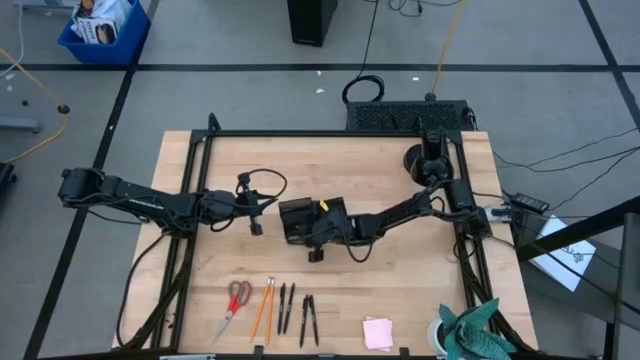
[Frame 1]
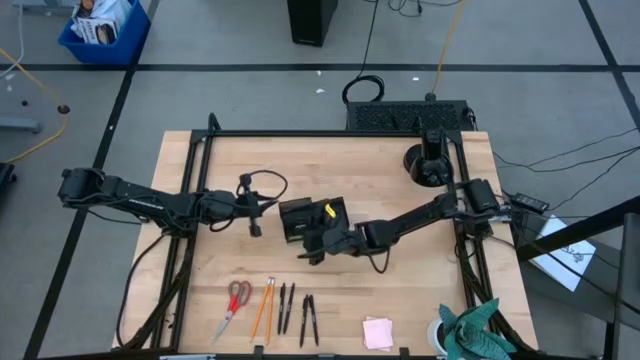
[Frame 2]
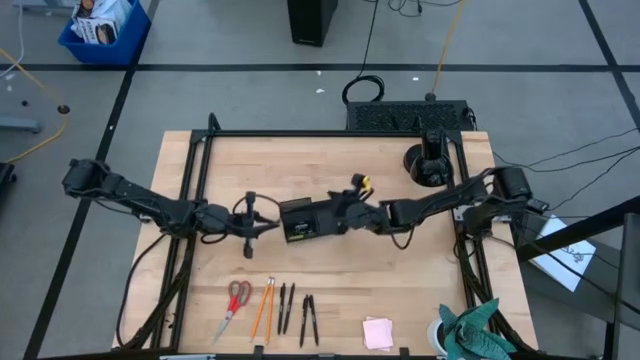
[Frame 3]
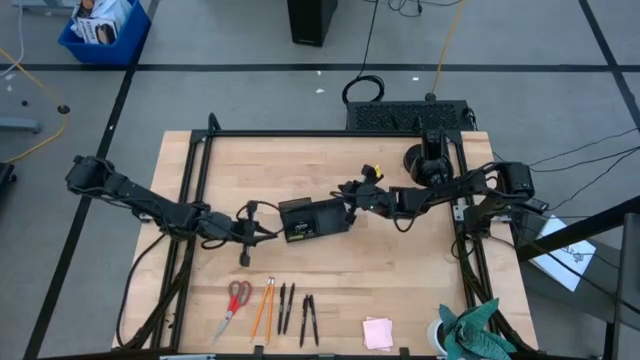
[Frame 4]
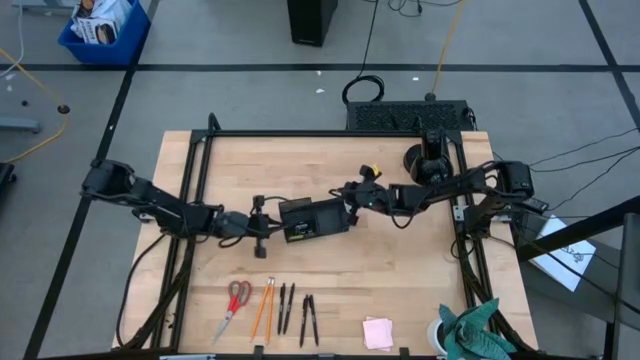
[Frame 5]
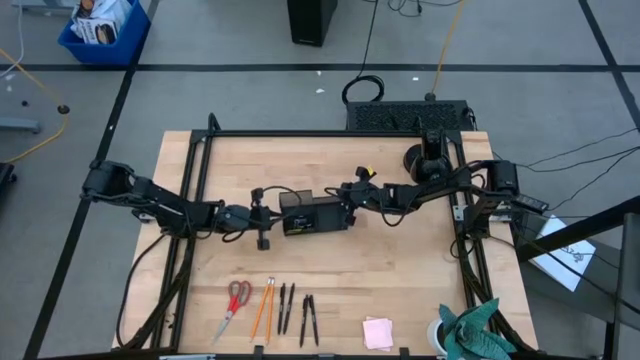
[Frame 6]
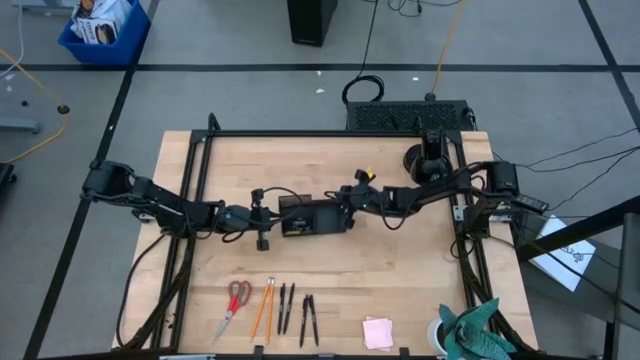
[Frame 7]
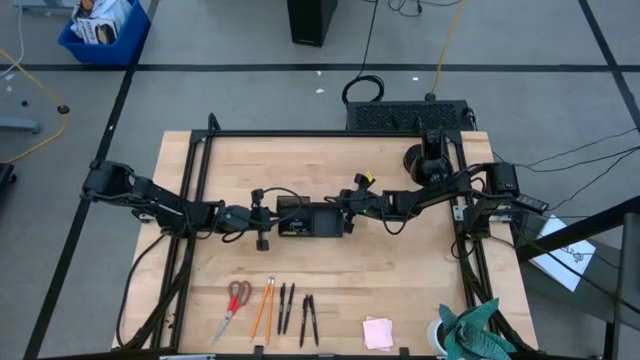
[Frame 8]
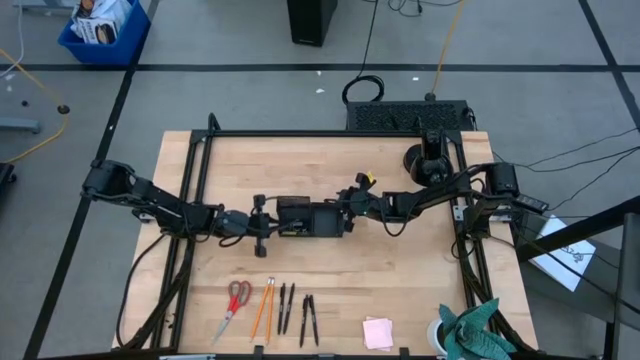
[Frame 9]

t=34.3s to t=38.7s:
Task: Pick and place office supplies into organizer
Adjust the black desk organizer on the table

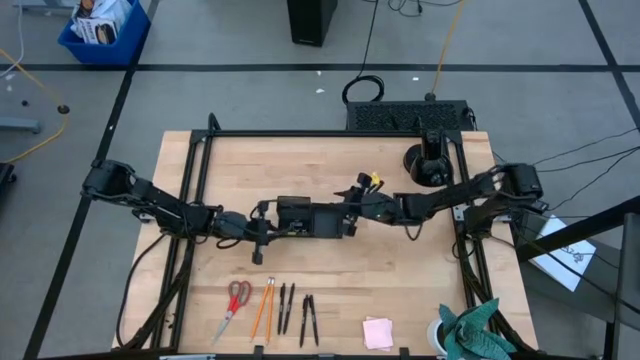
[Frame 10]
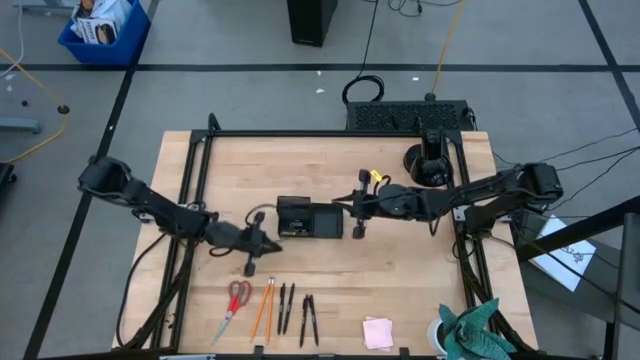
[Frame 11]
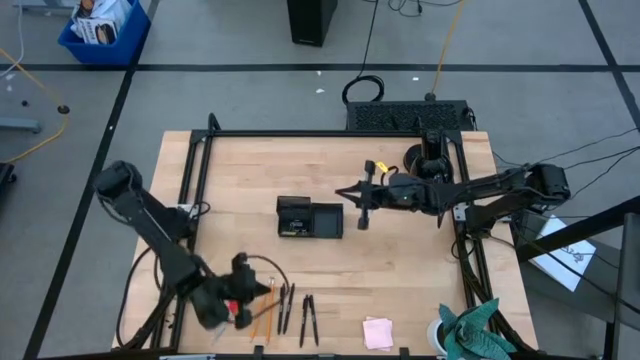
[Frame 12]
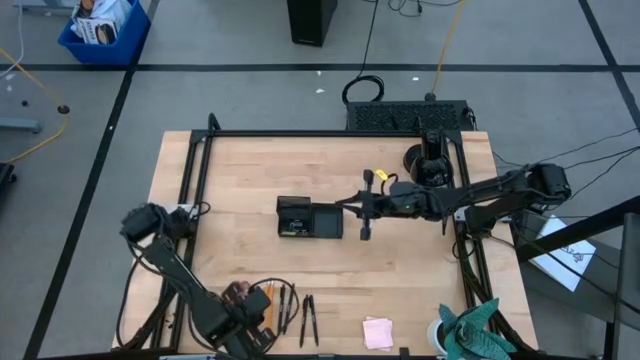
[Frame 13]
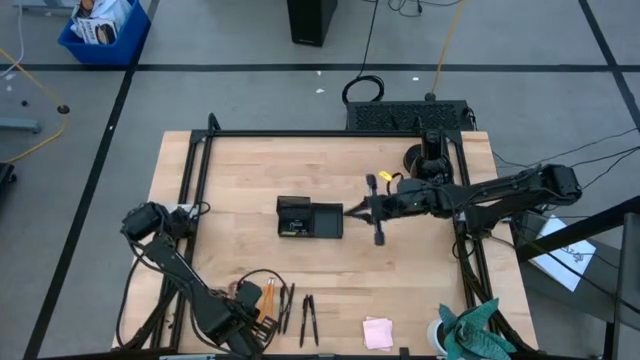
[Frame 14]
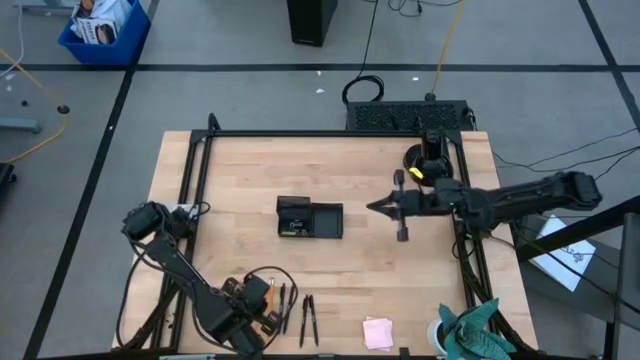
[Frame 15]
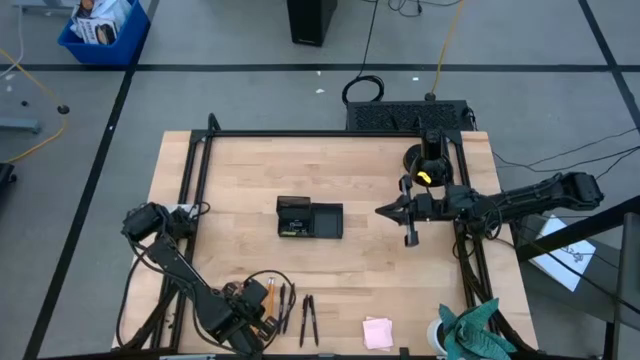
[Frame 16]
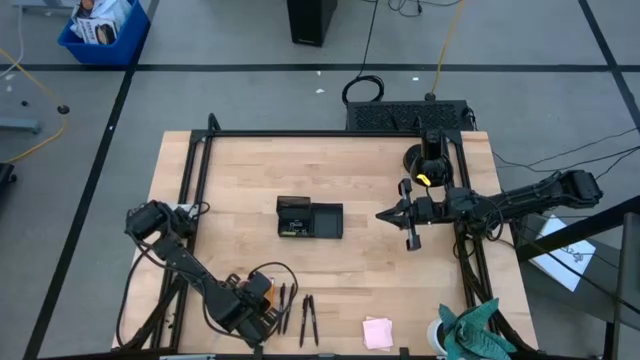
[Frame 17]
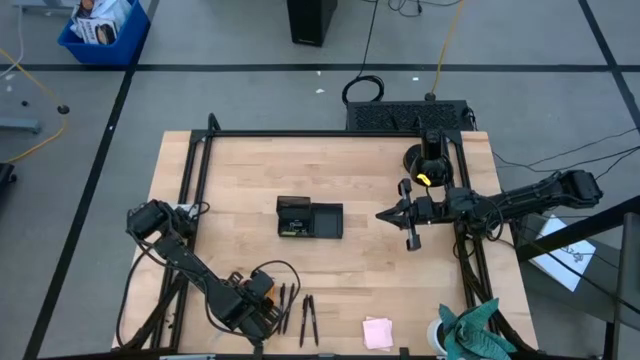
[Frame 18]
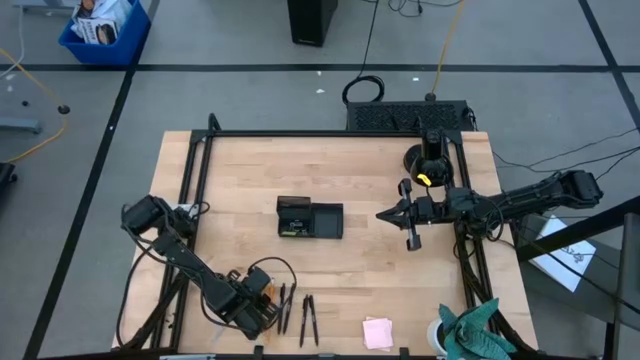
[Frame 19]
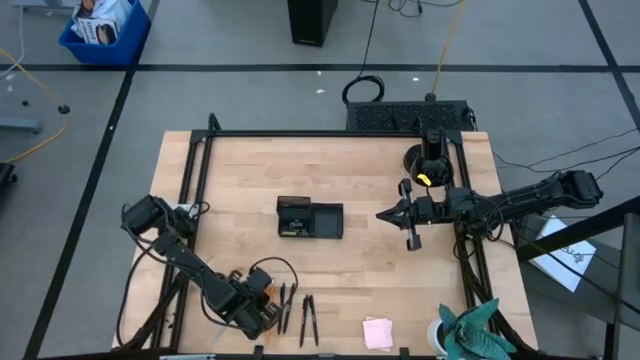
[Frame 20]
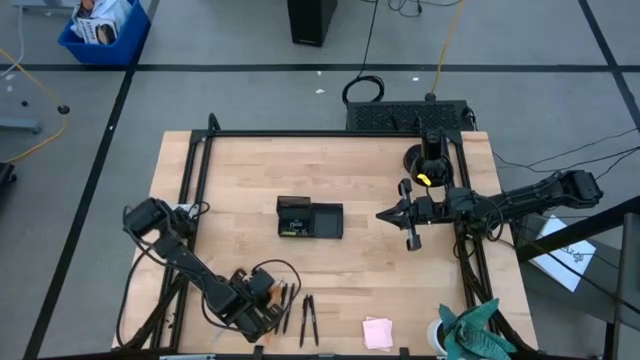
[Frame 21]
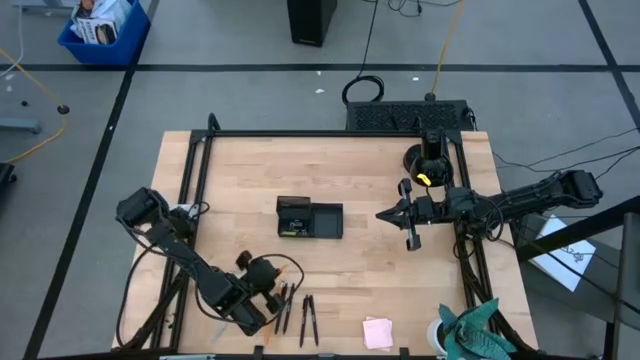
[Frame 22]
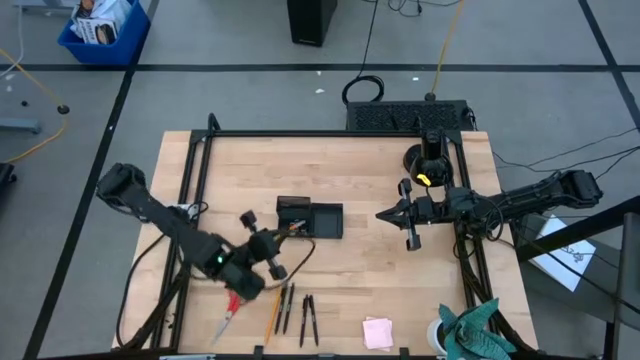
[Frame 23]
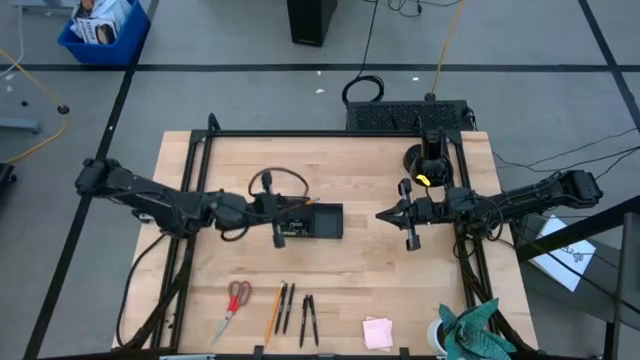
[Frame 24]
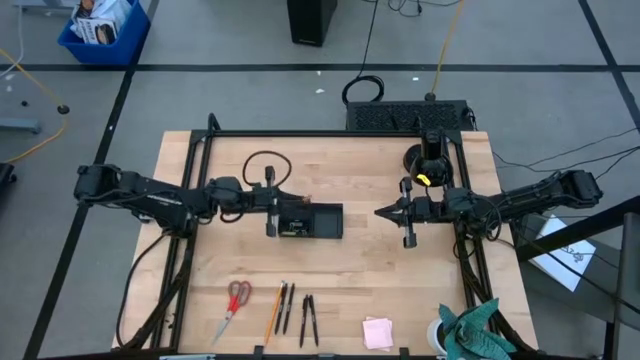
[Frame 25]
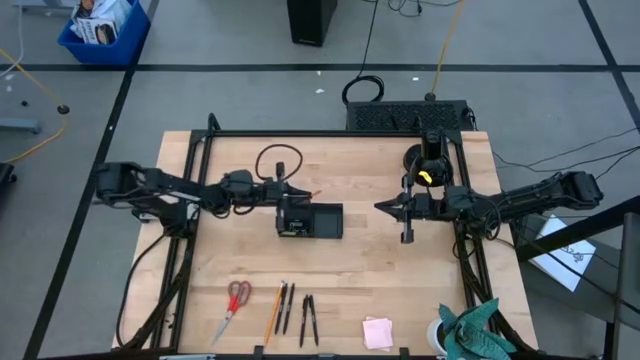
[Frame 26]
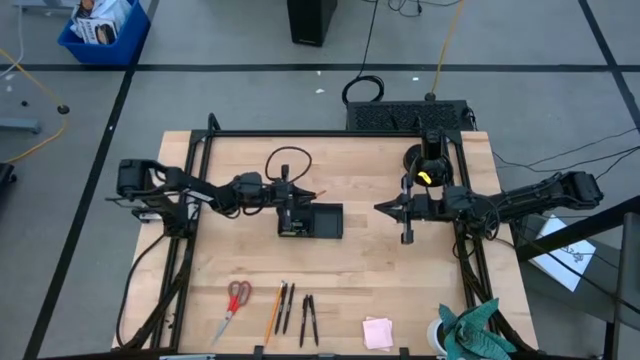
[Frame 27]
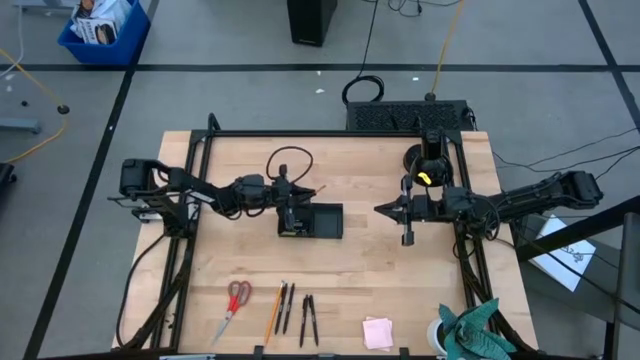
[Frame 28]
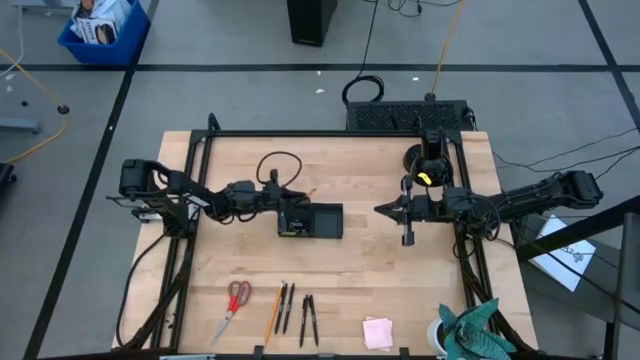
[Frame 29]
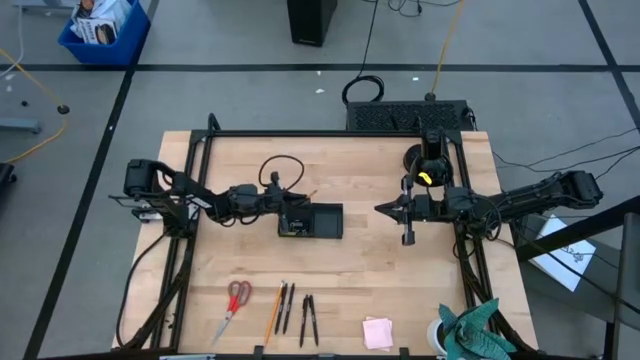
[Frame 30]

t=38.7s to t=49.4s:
Put the orange pencil into the black desk organizer

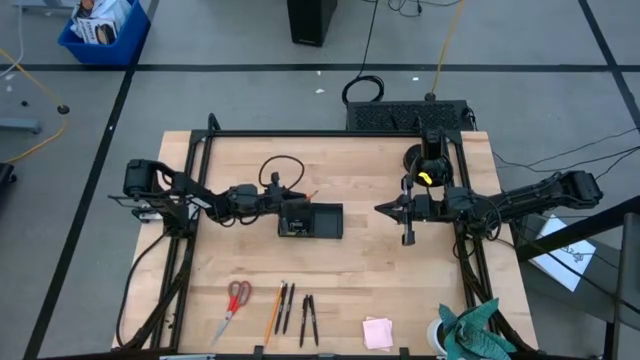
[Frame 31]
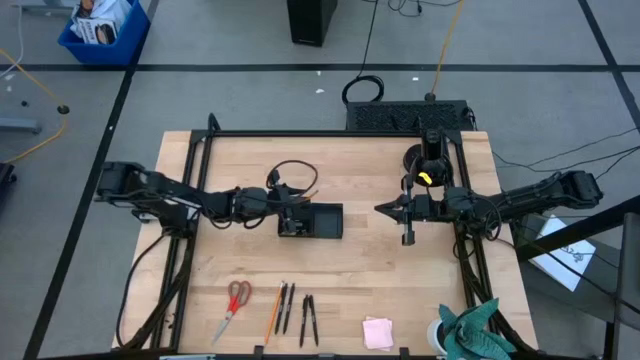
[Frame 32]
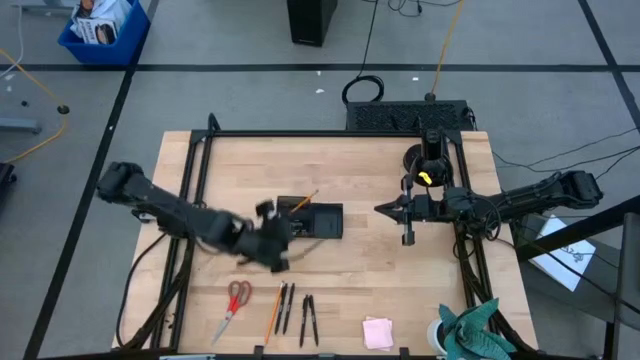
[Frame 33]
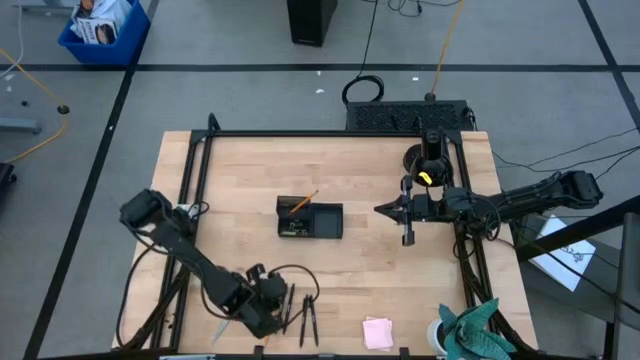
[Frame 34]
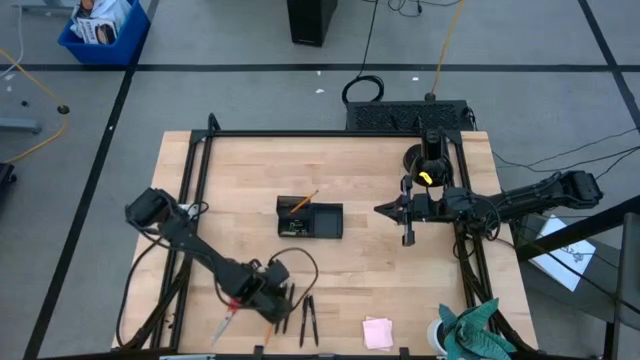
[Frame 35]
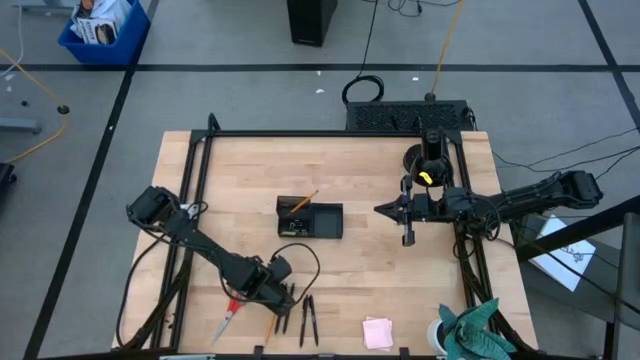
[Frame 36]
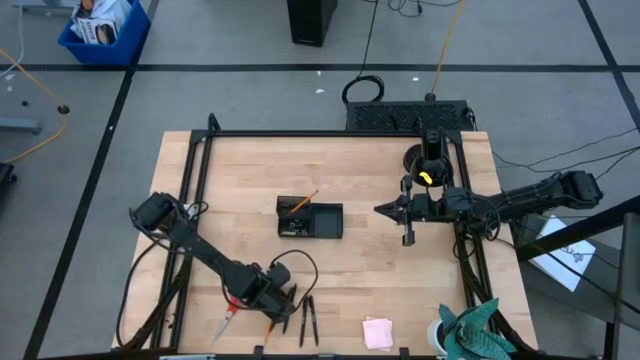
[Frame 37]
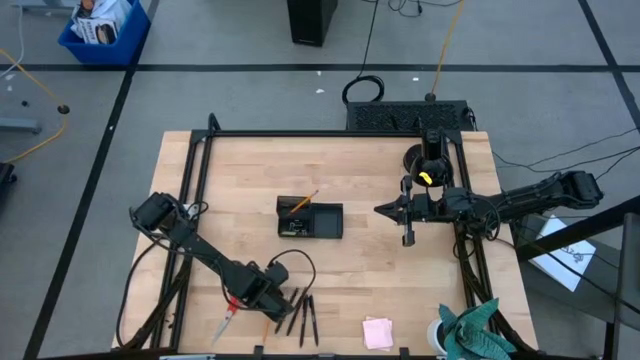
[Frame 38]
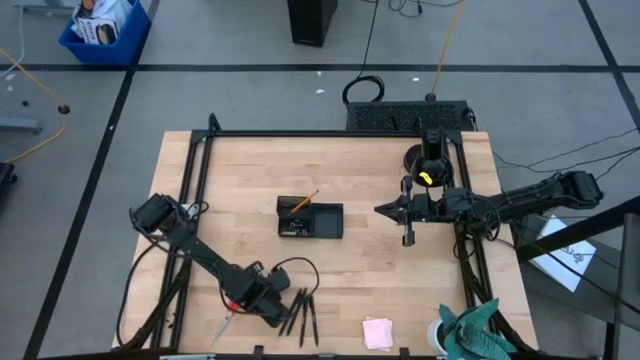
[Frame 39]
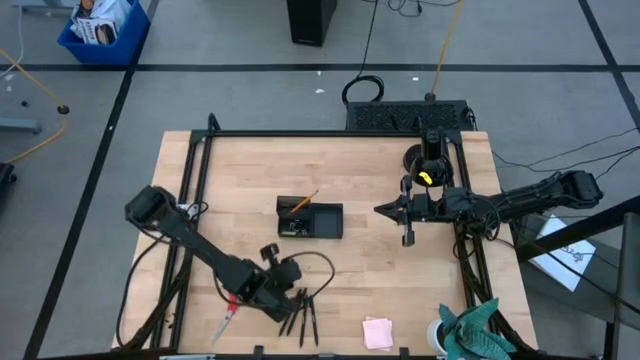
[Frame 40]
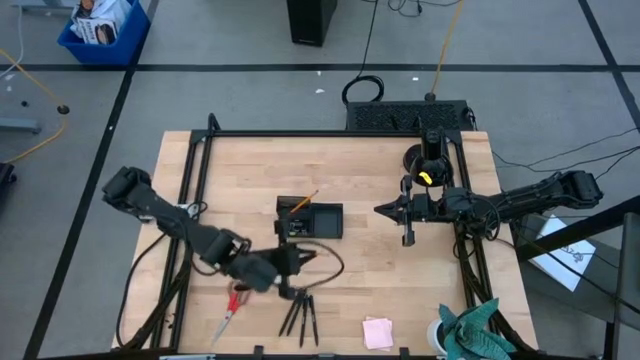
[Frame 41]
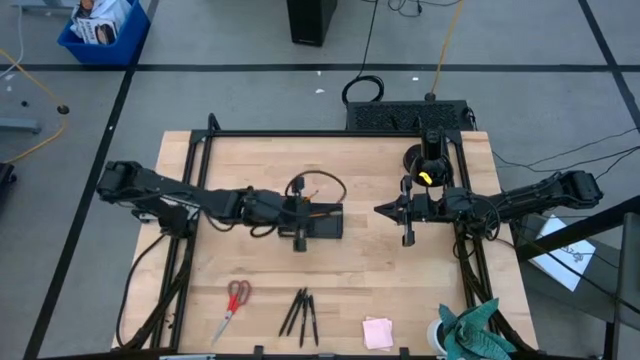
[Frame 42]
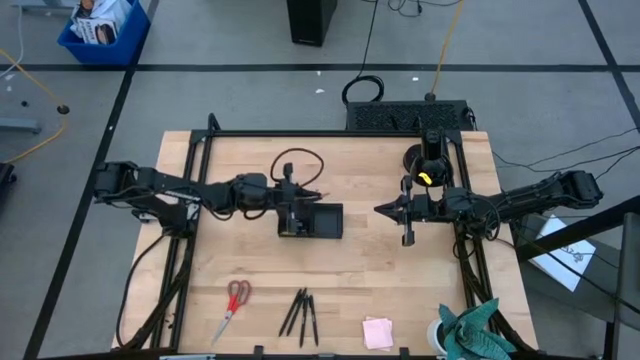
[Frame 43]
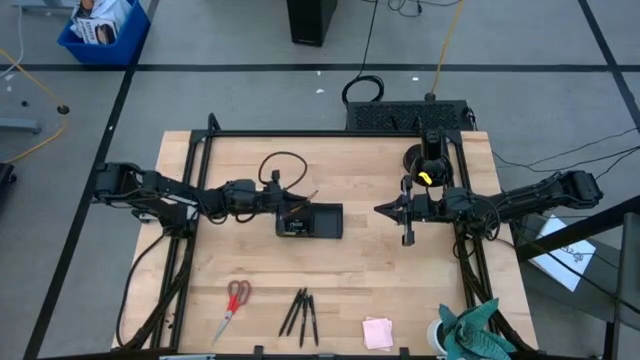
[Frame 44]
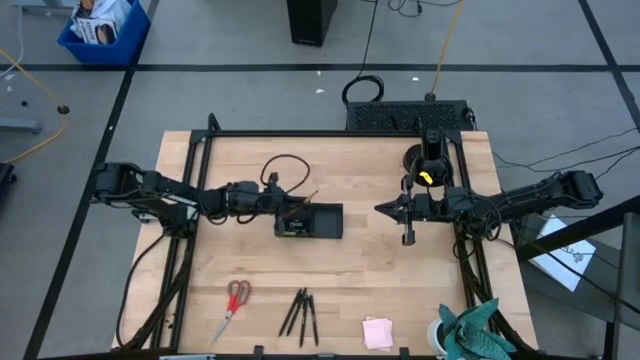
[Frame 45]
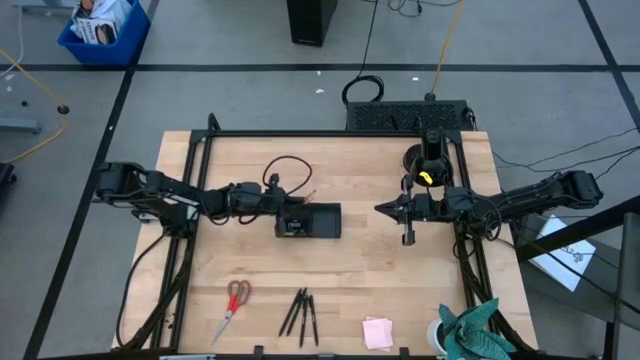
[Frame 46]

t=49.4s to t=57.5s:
Put the orange pencil into the black desk organizer
